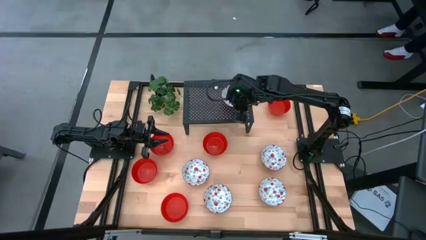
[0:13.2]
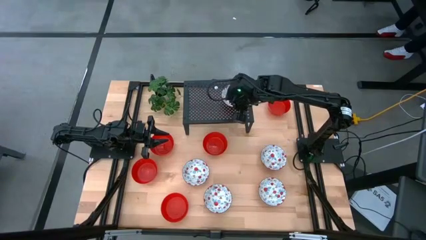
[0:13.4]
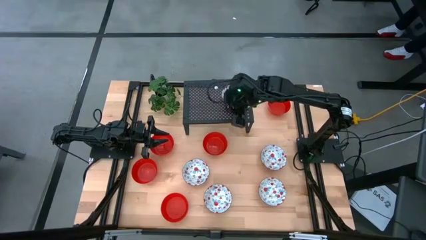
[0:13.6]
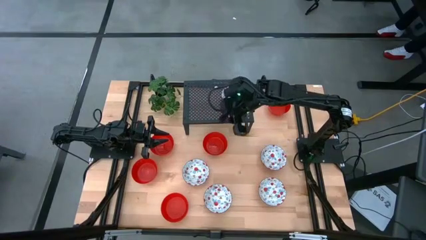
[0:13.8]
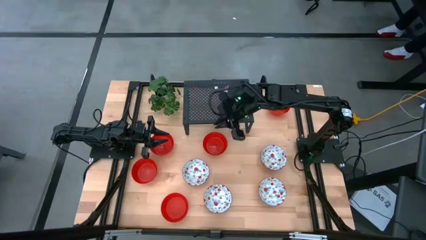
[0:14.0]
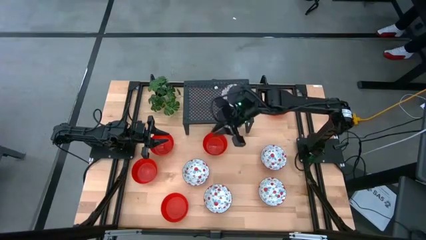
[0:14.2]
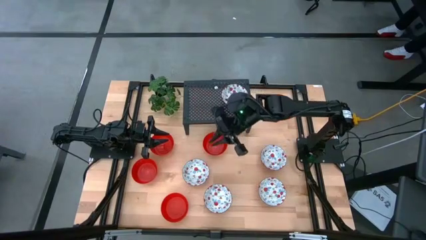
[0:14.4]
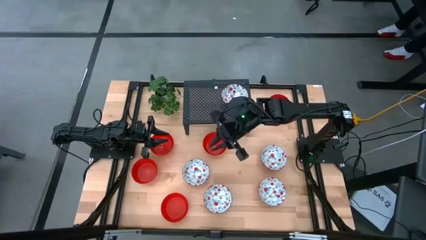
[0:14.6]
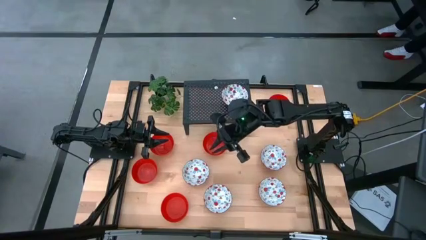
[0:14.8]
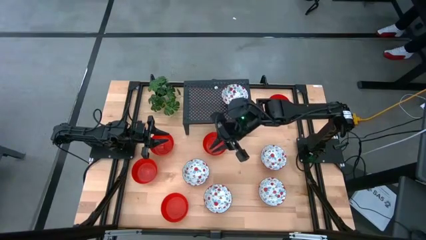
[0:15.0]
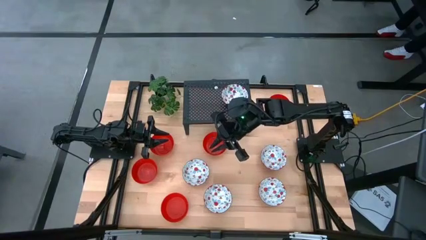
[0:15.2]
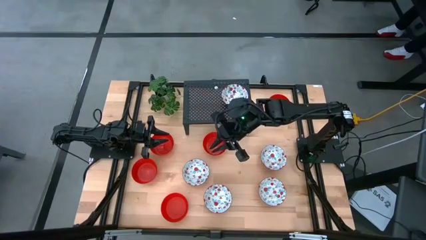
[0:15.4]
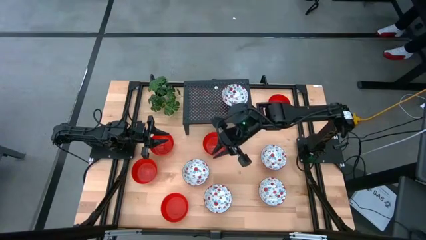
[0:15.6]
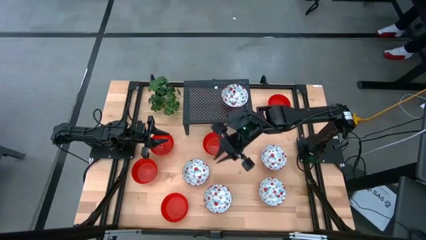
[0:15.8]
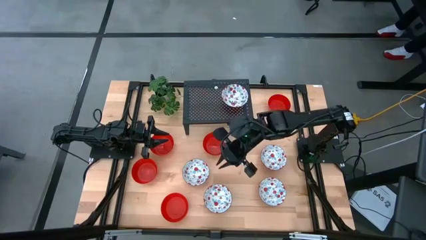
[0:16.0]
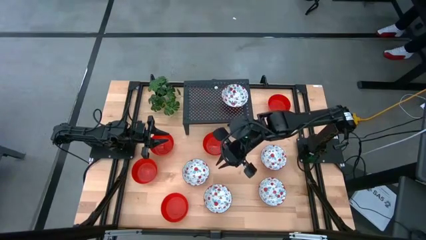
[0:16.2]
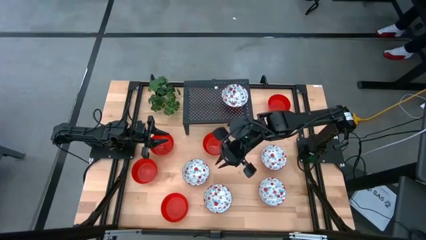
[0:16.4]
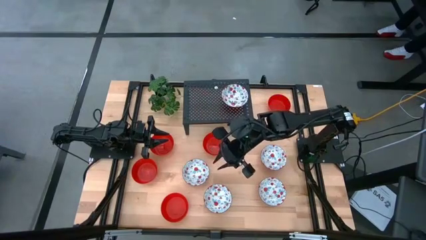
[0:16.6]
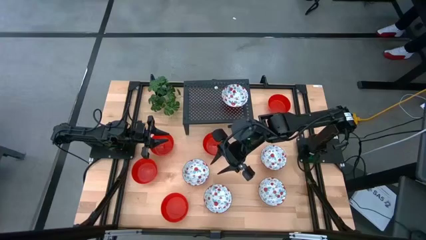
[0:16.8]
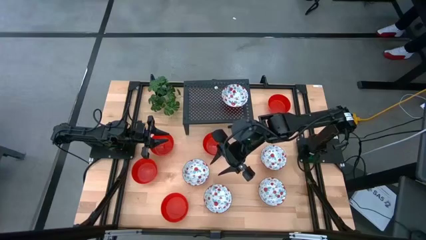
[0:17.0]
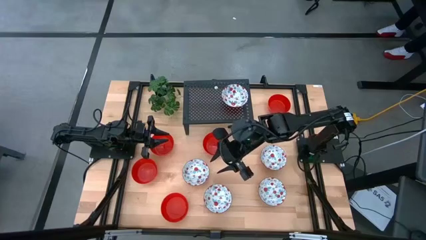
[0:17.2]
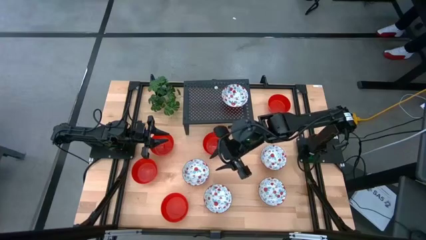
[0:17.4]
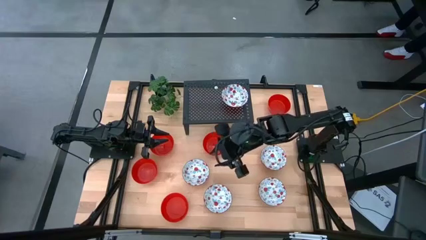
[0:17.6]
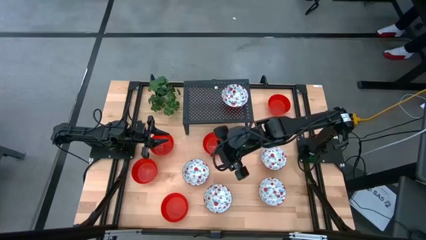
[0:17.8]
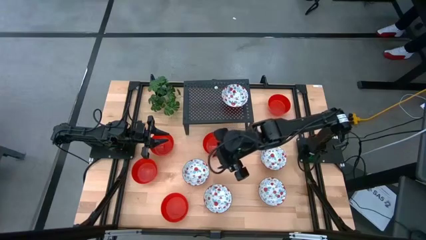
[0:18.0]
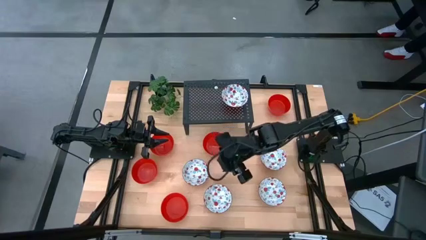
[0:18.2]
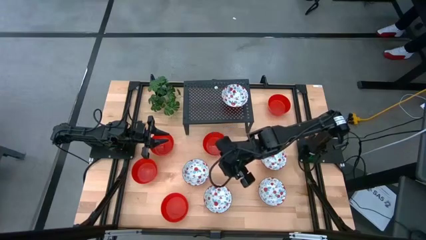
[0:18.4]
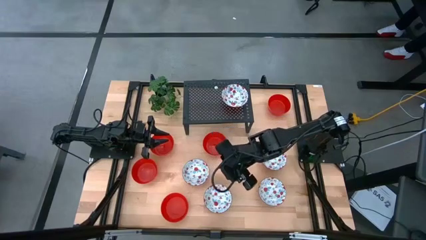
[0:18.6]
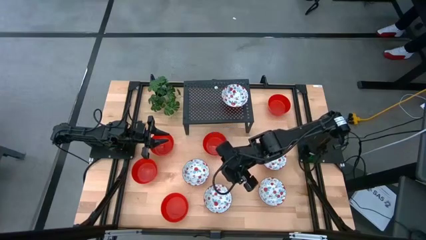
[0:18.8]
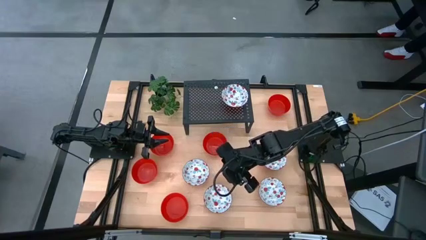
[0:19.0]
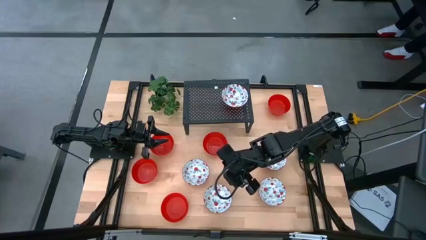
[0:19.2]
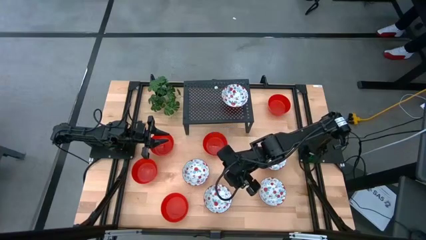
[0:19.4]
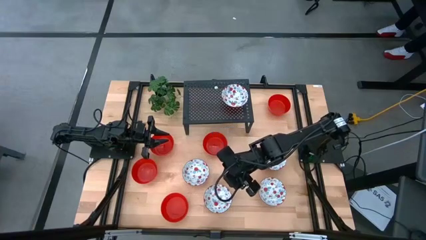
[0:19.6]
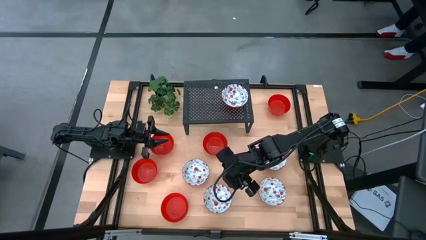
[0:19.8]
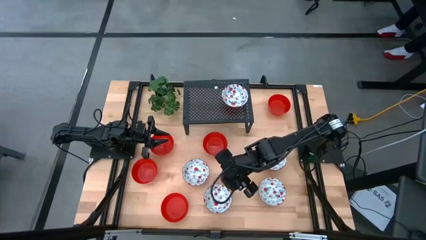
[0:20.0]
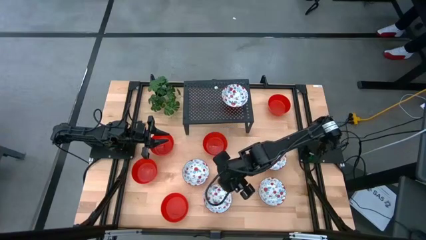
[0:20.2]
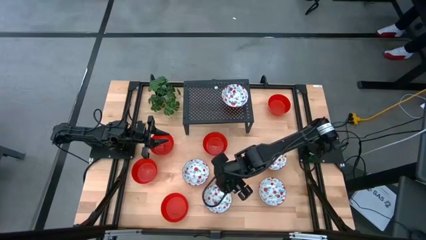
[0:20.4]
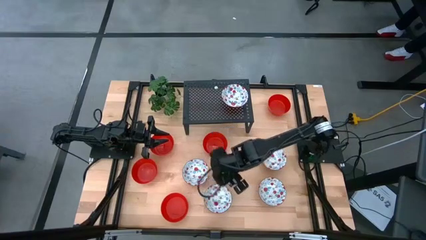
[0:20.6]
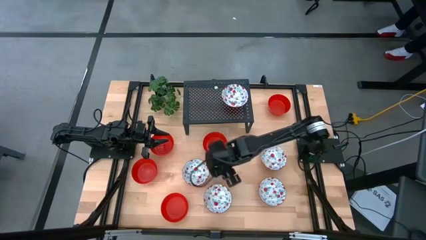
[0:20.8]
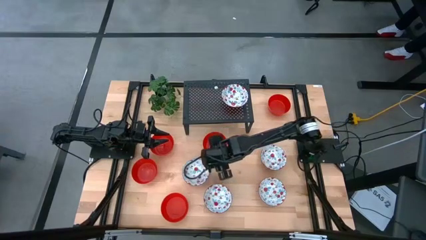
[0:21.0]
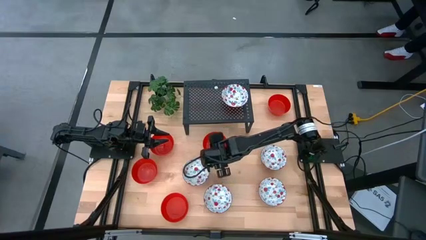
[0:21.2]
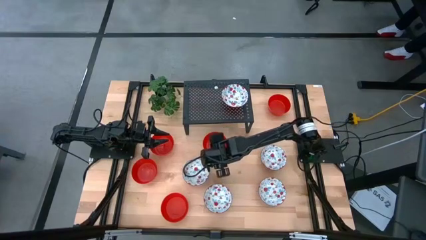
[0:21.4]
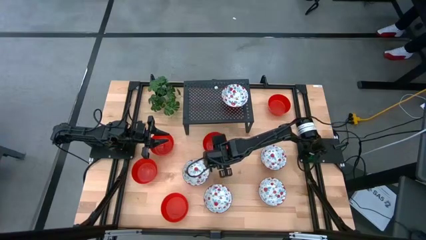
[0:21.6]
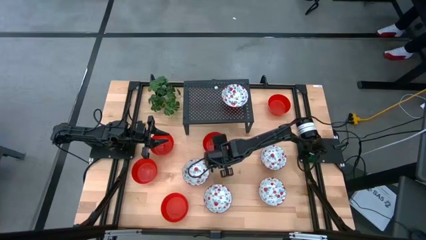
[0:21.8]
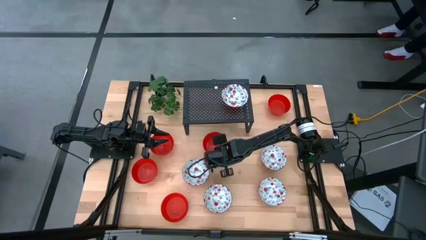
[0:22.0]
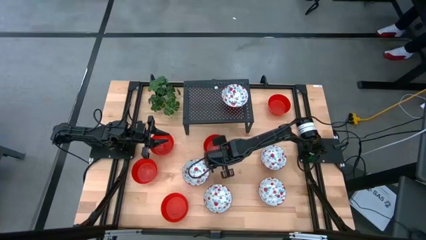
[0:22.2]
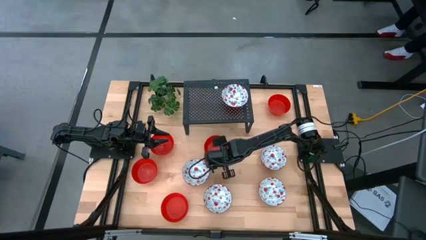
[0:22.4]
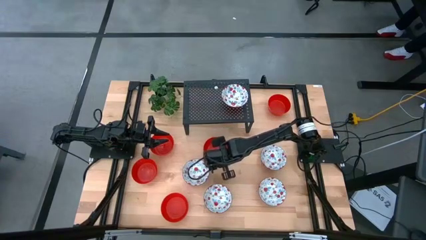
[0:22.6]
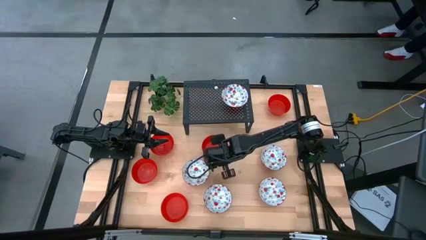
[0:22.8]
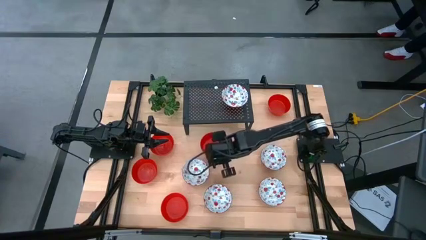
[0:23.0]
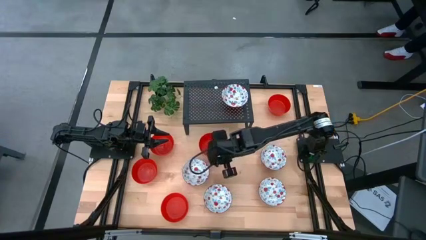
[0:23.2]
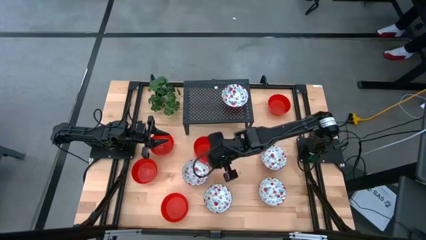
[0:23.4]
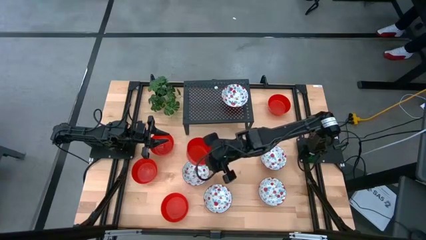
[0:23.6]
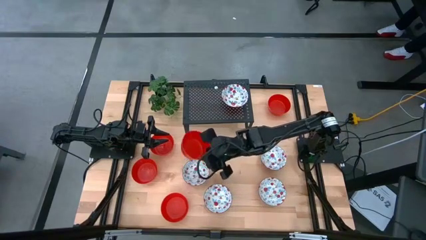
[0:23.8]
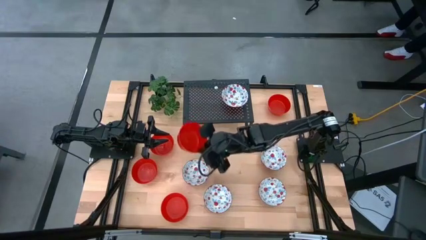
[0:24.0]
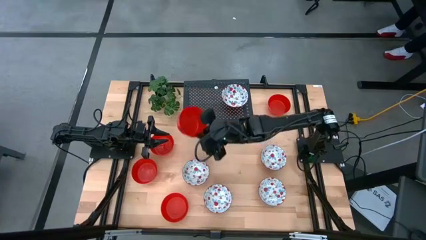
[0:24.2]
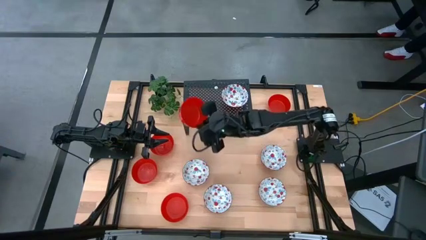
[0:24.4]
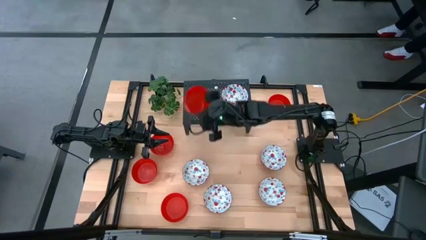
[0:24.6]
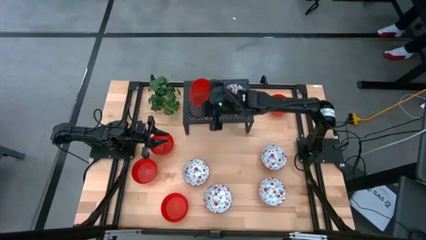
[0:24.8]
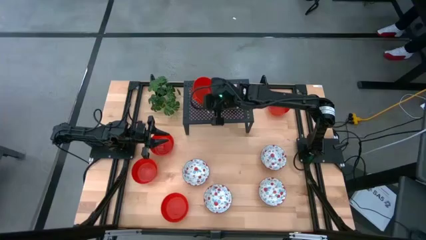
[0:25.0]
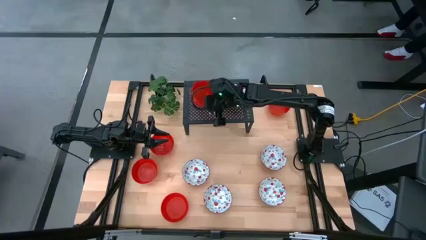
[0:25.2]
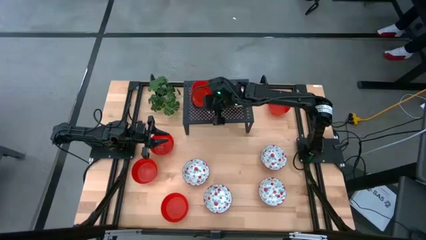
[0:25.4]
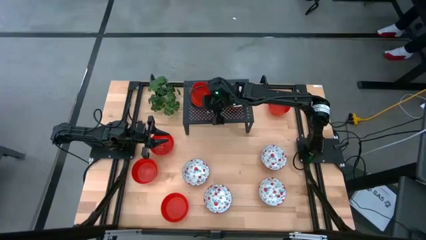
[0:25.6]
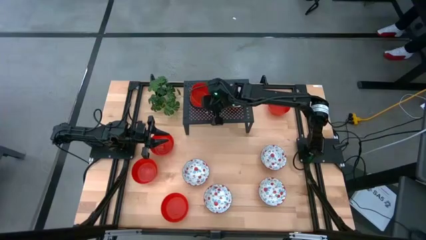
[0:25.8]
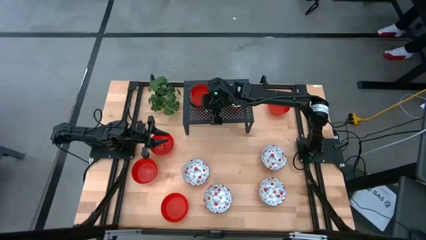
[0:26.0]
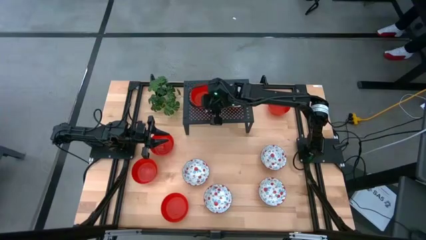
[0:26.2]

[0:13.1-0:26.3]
Task: Pick & Place Mini bowls
Put the red bowl on the shelf
